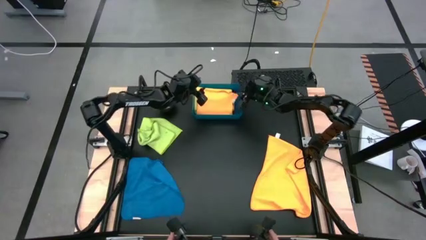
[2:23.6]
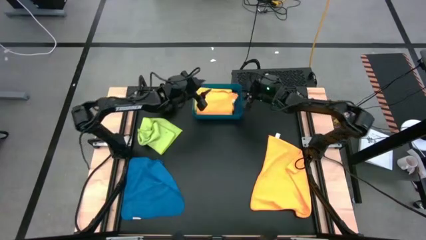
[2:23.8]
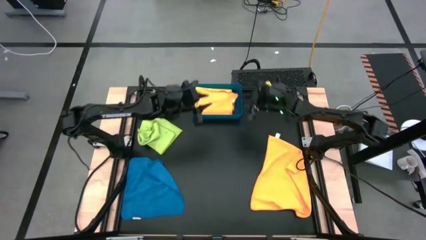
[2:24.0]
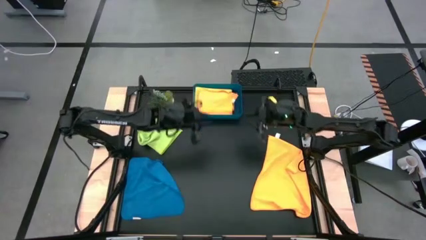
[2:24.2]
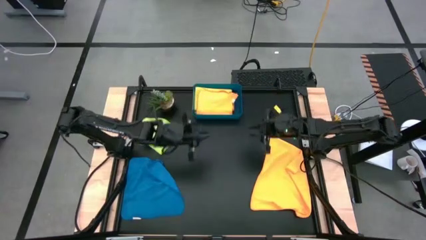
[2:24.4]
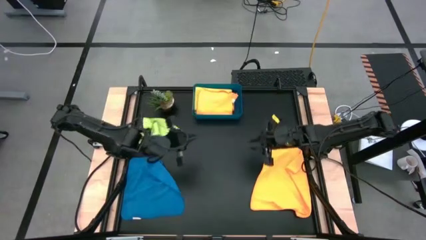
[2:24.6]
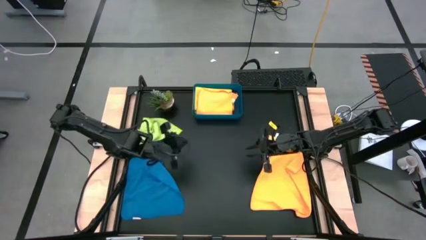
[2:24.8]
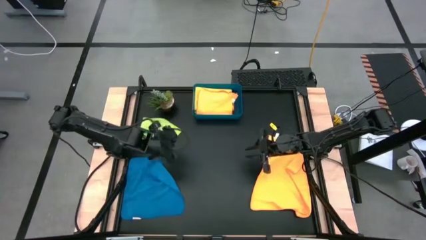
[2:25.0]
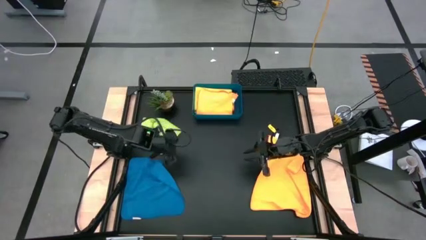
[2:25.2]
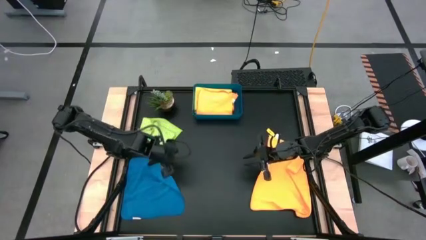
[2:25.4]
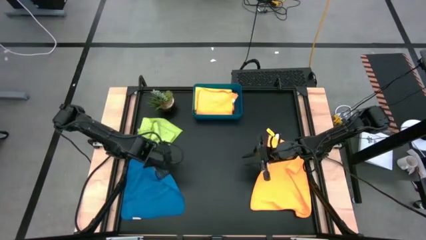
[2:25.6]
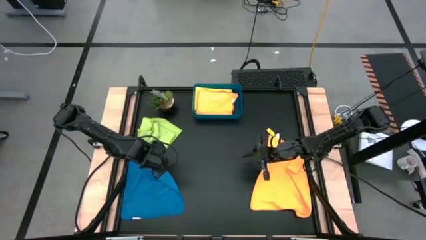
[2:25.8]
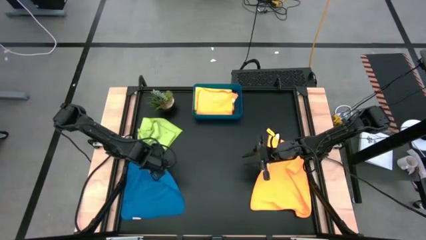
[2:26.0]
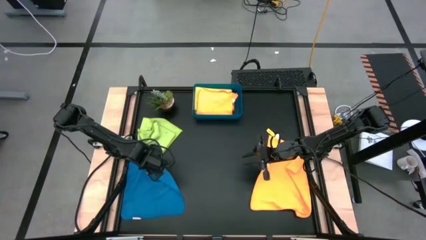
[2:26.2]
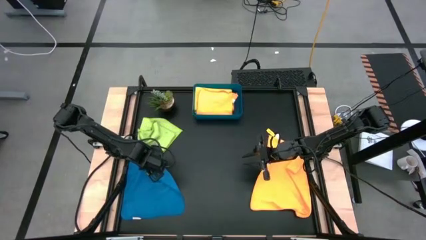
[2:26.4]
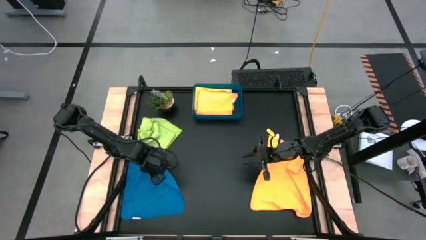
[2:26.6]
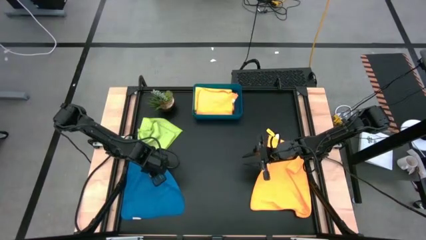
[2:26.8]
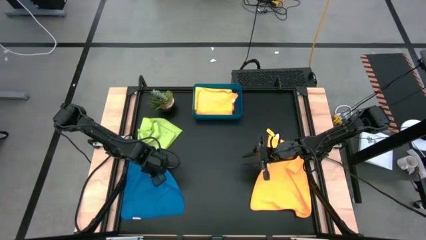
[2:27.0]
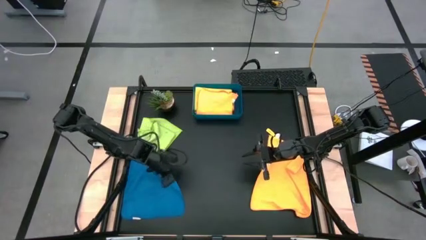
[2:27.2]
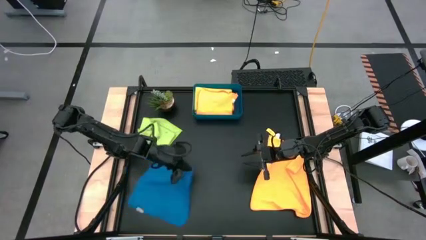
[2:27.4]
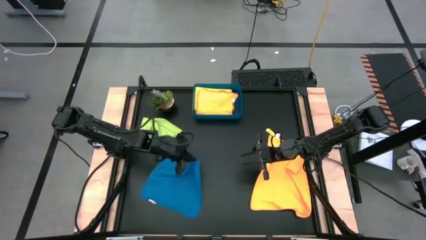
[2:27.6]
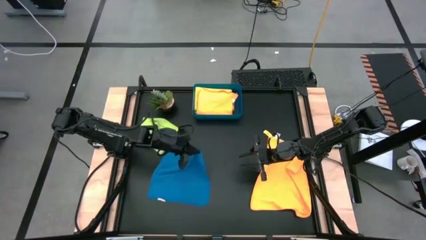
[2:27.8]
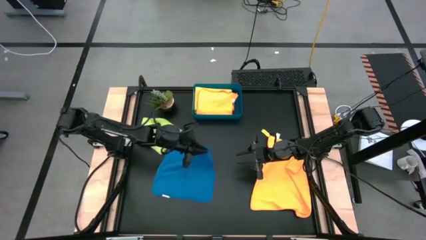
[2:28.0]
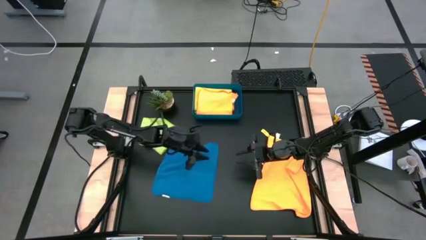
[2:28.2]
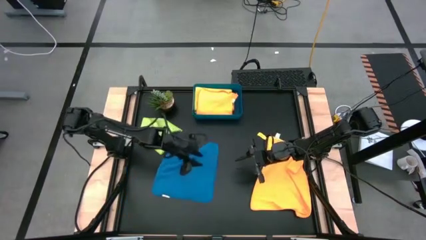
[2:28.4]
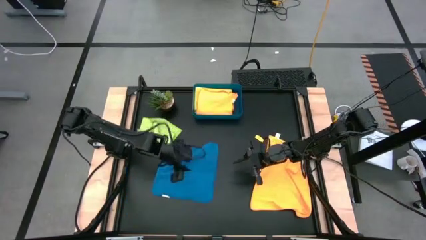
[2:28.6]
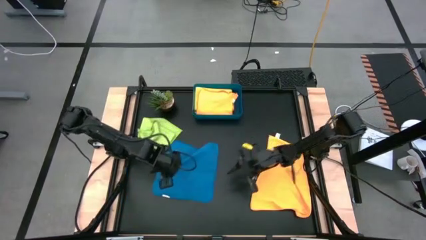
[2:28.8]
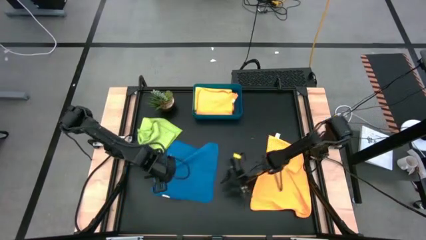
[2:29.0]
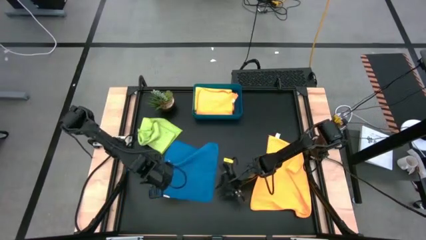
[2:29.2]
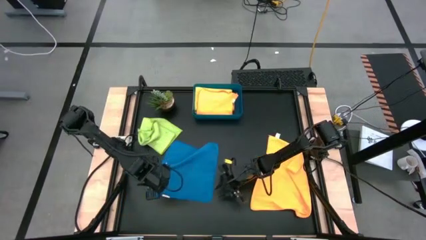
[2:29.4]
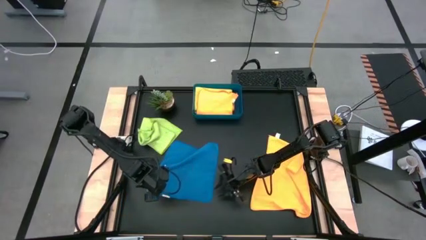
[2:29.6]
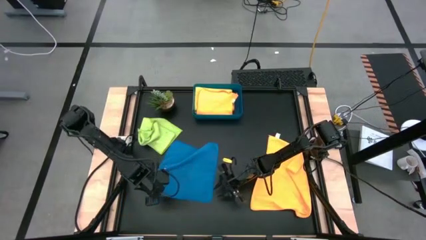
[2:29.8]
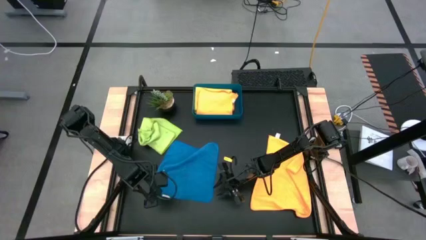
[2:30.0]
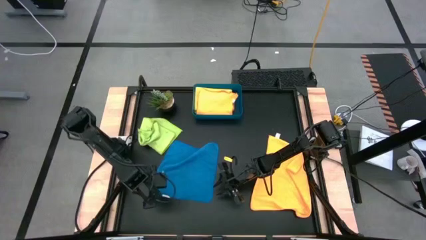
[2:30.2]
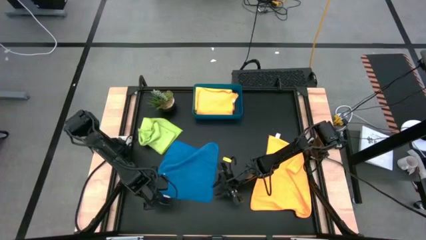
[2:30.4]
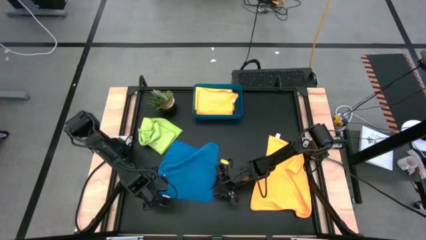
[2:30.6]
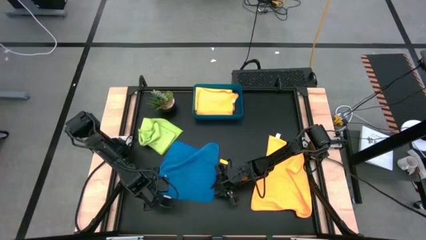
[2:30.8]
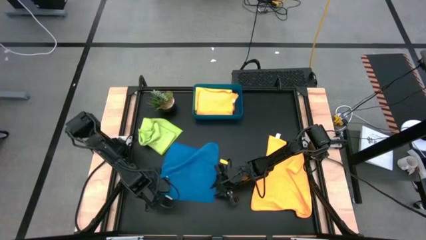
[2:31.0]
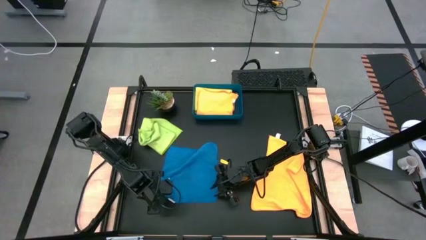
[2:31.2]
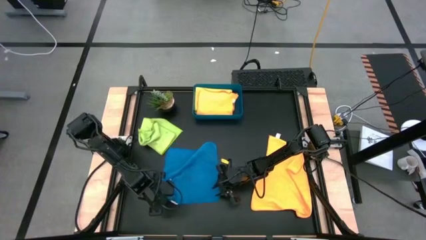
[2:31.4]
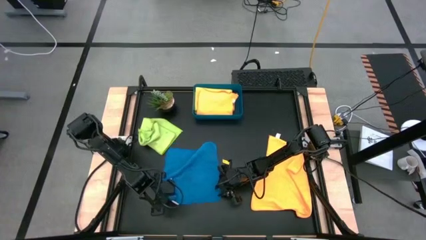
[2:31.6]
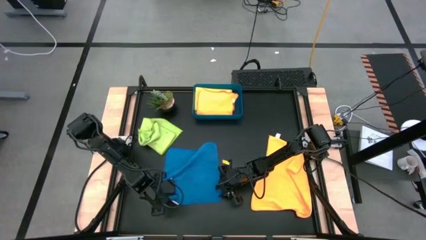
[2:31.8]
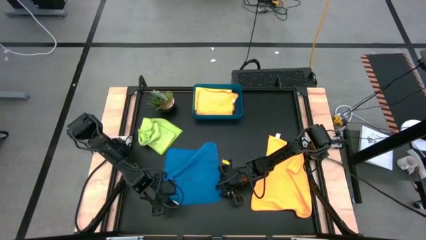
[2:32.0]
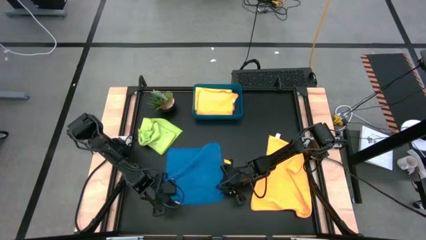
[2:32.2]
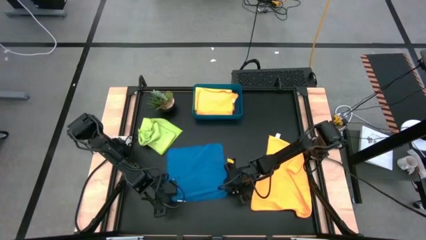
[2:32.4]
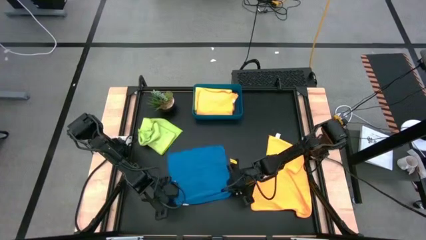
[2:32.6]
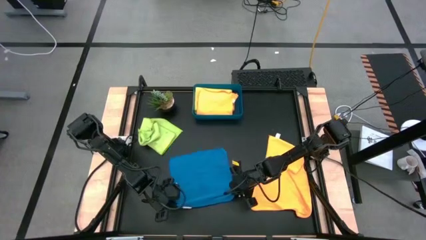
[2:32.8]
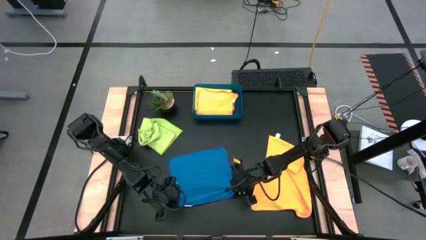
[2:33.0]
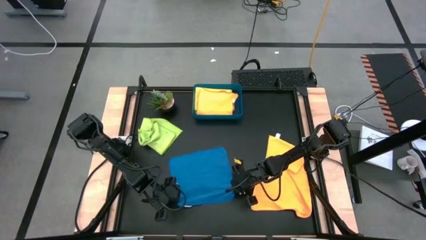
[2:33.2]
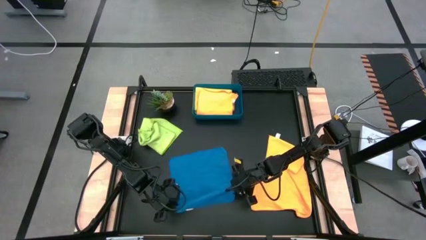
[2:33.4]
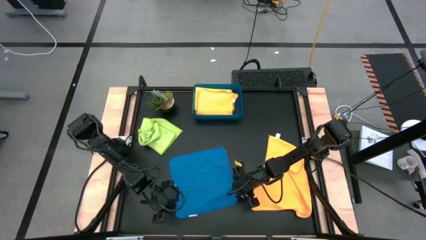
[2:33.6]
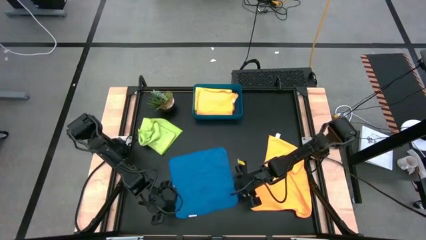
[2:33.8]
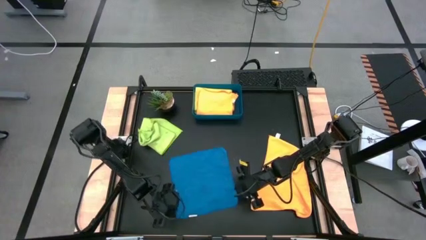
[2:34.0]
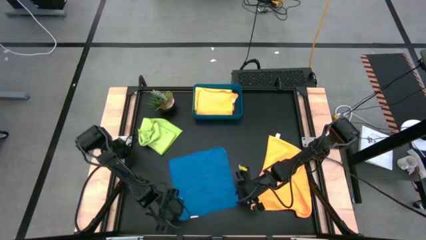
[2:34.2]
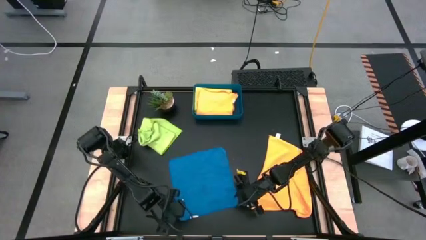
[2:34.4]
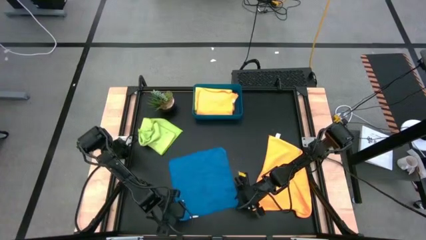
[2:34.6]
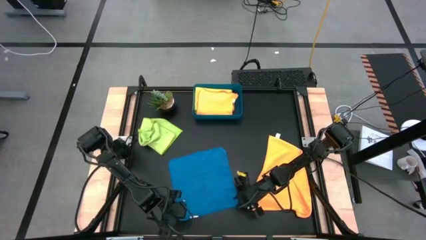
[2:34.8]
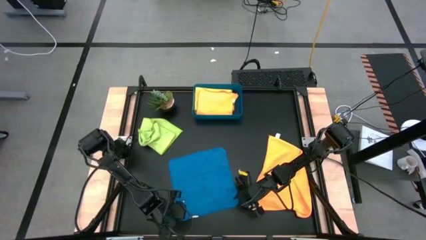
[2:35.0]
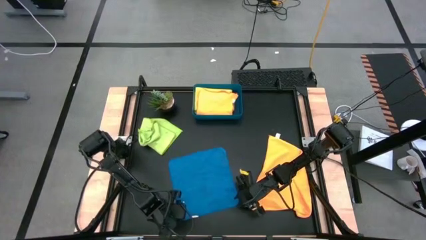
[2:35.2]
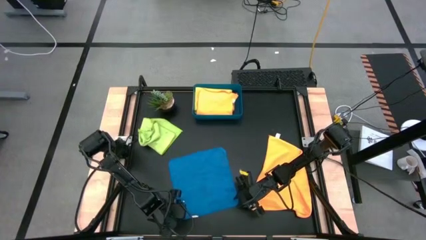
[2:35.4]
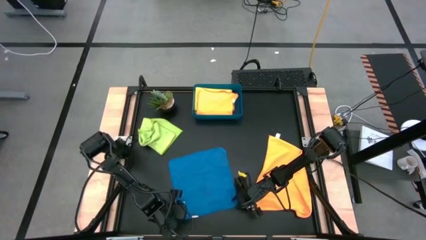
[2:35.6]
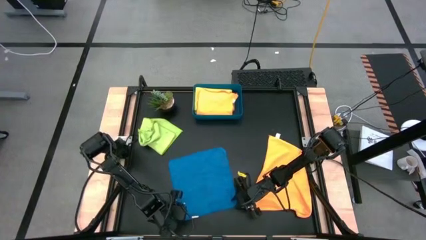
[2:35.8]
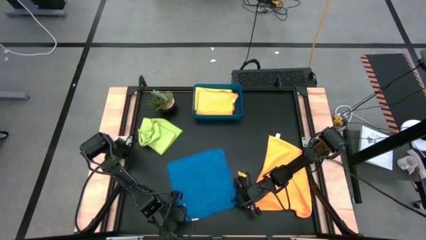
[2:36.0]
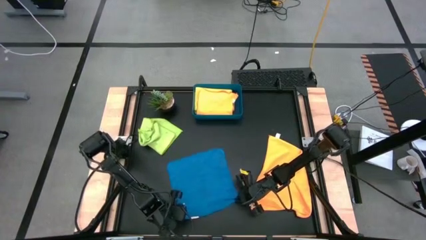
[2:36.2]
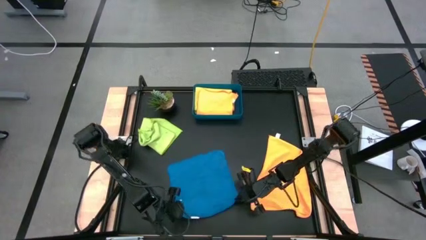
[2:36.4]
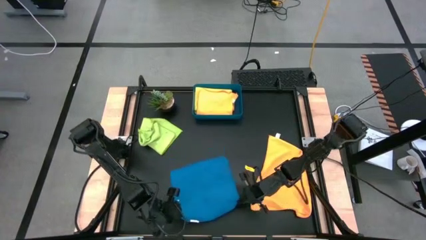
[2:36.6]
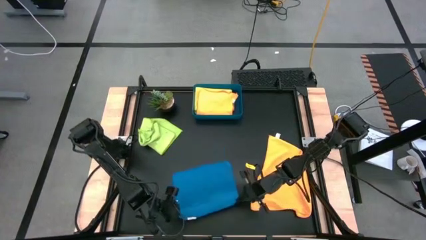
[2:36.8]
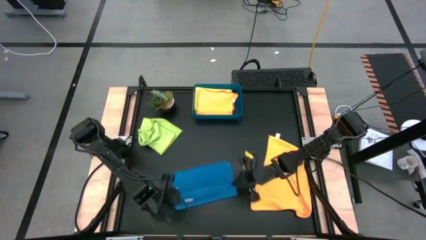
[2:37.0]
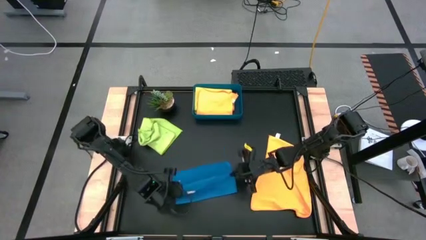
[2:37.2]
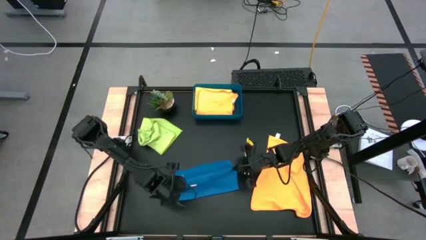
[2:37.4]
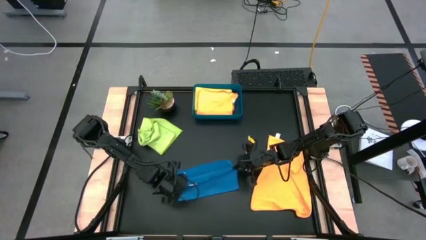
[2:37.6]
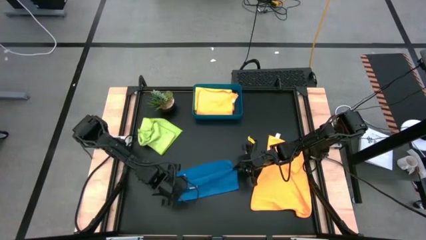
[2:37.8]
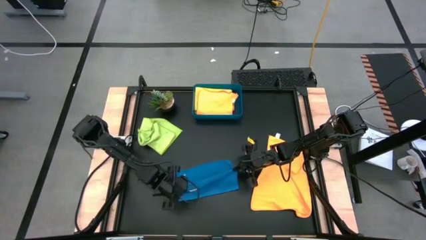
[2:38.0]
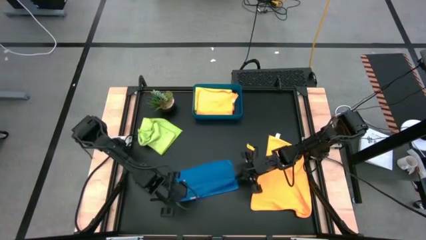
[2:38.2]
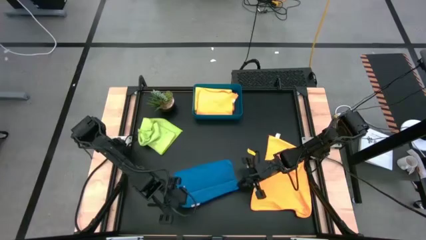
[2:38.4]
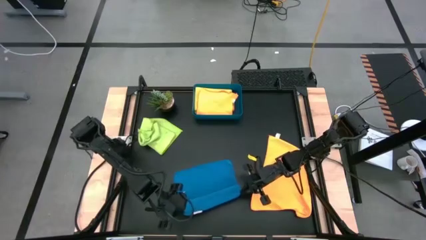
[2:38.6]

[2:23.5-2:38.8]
Task: Fold microfiber towels
Fold the blue microfiber cloth

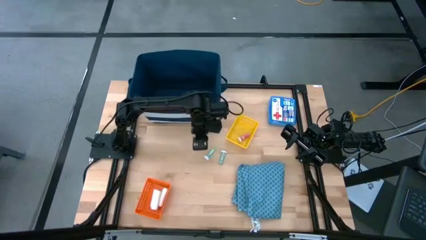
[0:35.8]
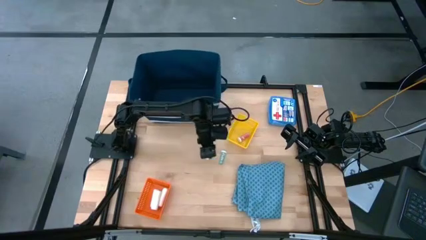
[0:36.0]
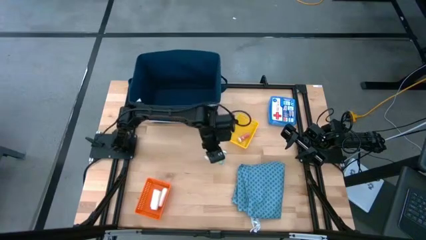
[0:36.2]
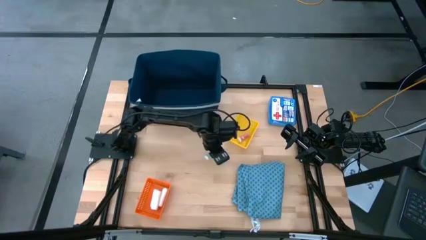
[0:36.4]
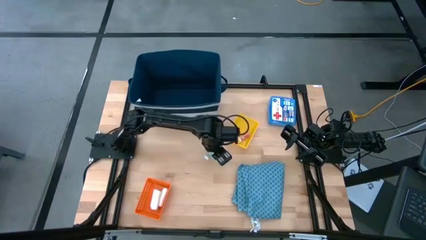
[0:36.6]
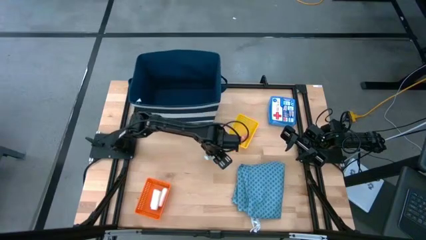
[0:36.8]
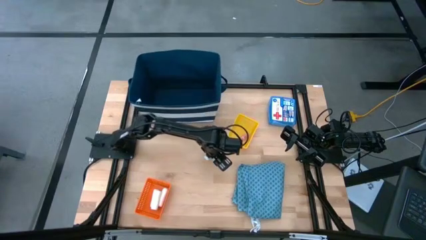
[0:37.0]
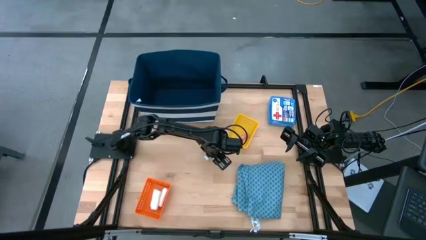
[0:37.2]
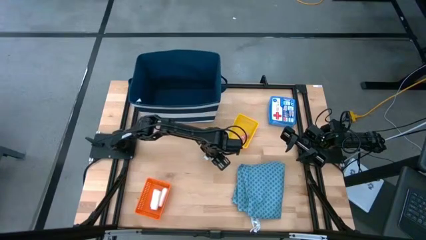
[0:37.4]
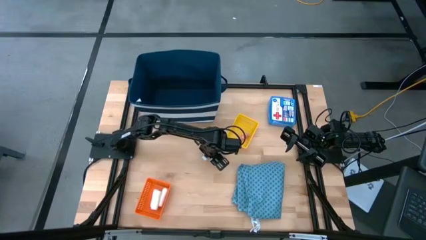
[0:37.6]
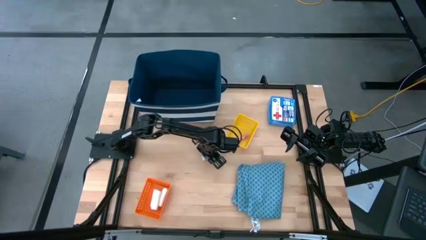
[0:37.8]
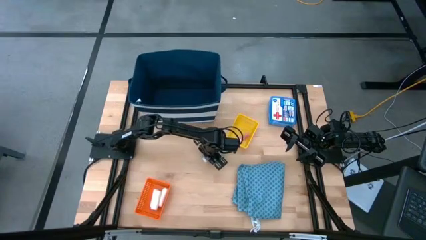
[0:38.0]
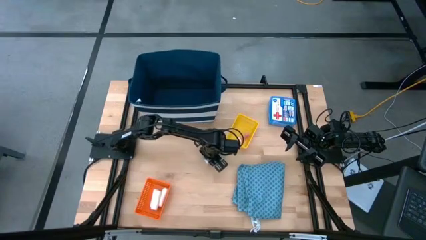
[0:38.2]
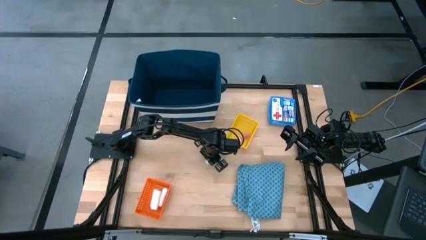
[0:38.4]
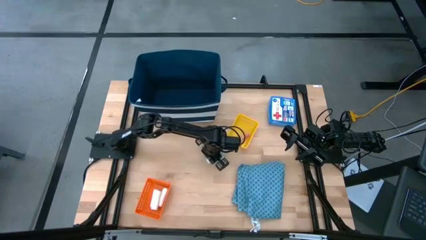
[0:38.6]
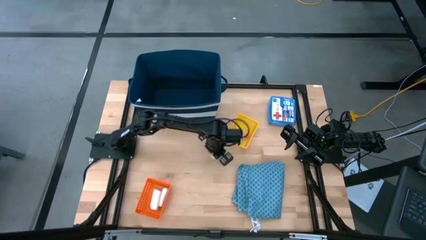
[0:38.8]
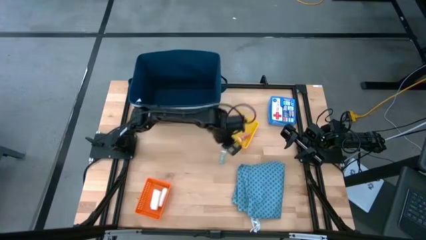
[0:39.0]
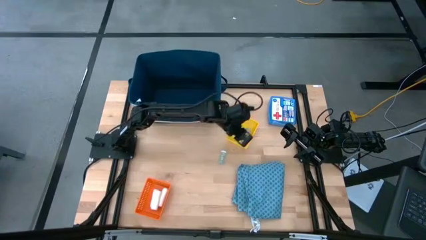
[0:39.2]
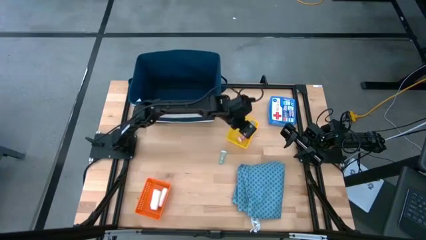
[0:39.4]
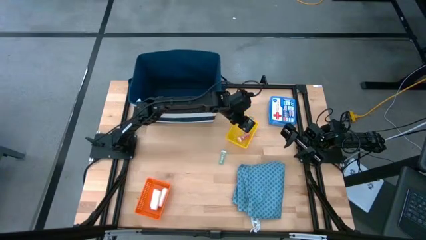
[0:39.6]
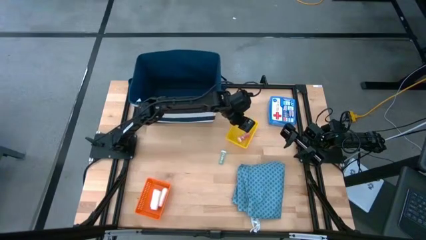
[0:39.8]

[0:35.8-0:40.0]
Task: Pick & place medical supplies in basket/bin
Put the left blue bottle in the yellow bin
